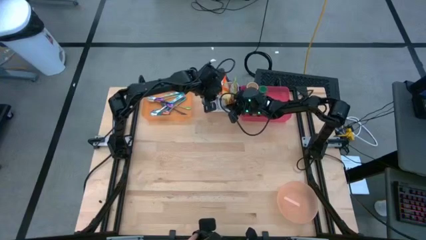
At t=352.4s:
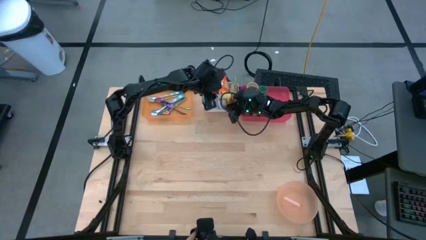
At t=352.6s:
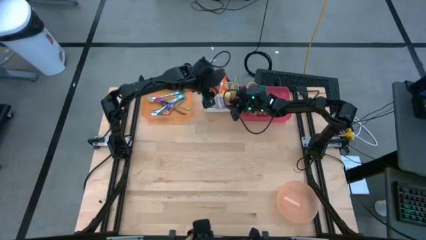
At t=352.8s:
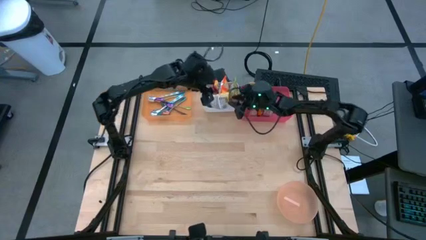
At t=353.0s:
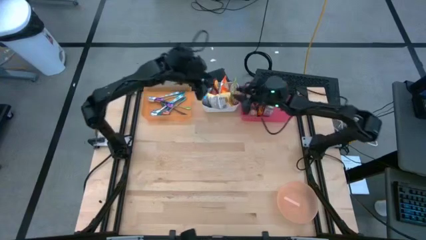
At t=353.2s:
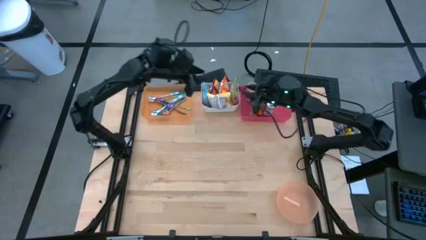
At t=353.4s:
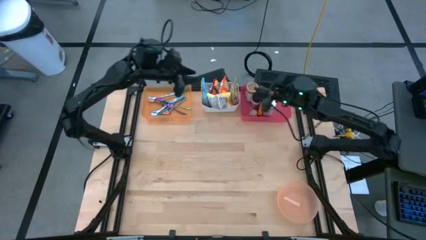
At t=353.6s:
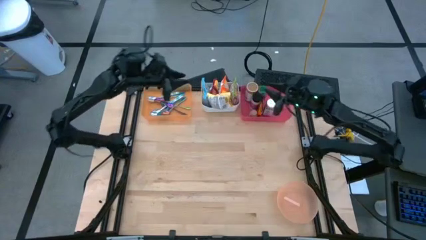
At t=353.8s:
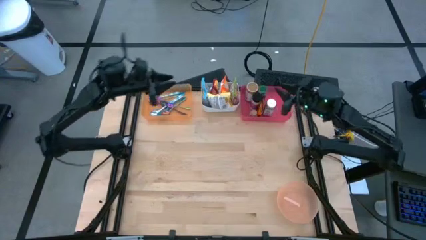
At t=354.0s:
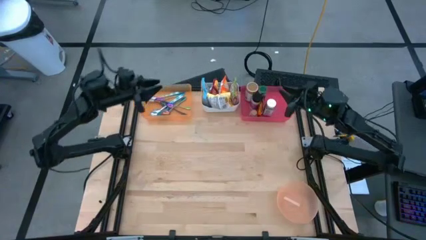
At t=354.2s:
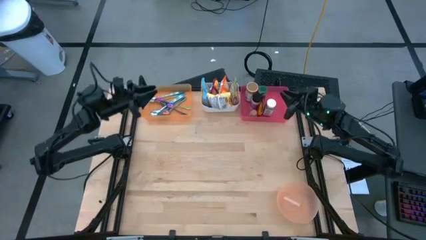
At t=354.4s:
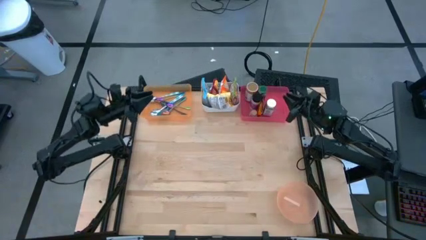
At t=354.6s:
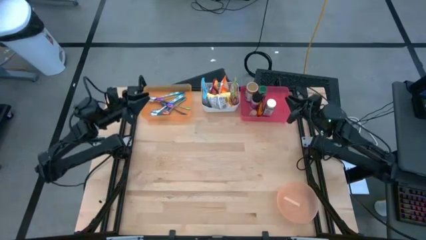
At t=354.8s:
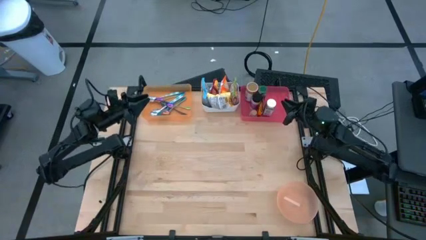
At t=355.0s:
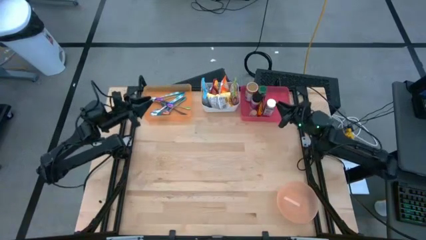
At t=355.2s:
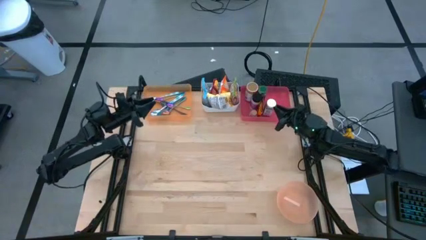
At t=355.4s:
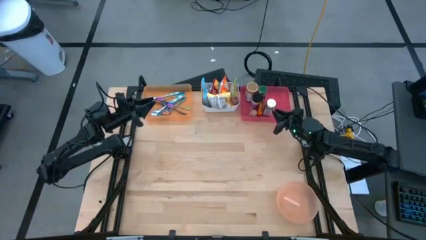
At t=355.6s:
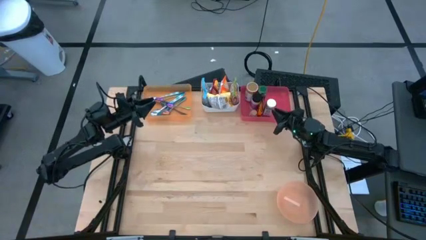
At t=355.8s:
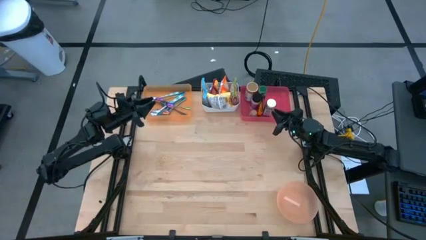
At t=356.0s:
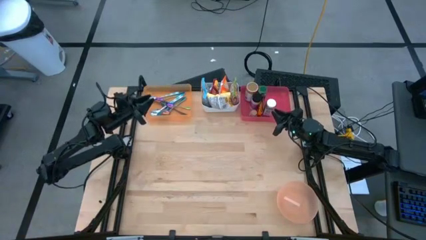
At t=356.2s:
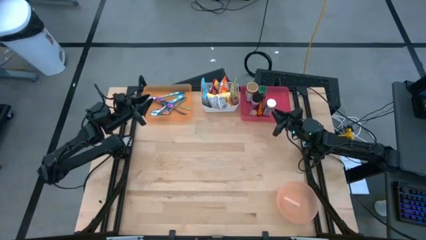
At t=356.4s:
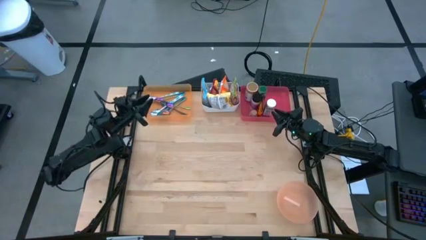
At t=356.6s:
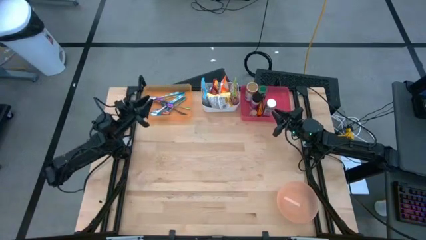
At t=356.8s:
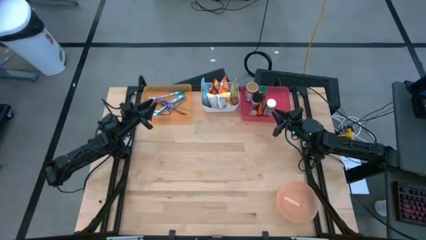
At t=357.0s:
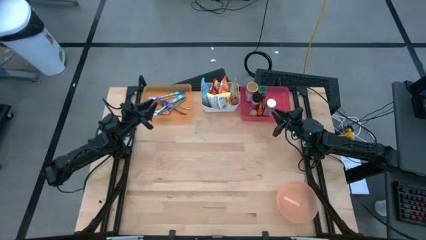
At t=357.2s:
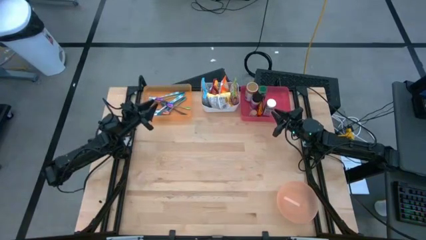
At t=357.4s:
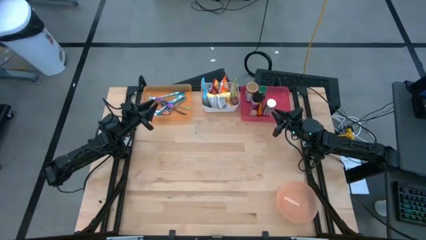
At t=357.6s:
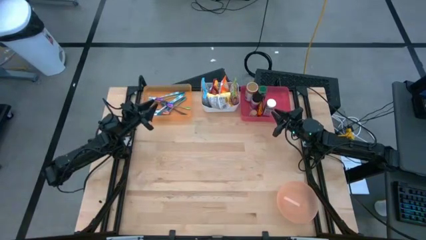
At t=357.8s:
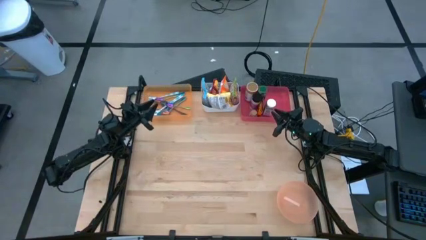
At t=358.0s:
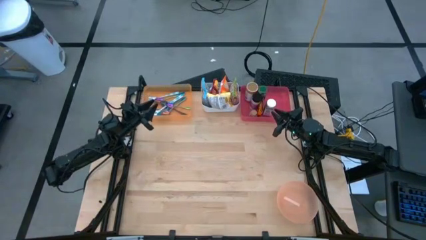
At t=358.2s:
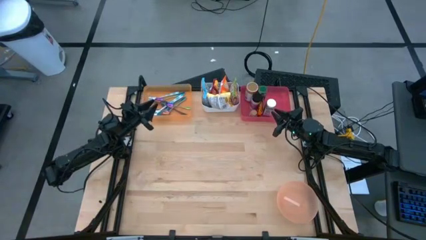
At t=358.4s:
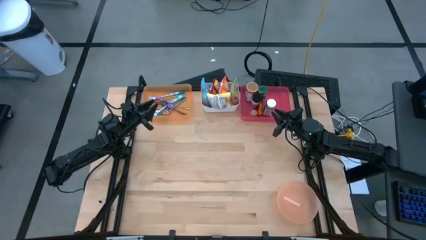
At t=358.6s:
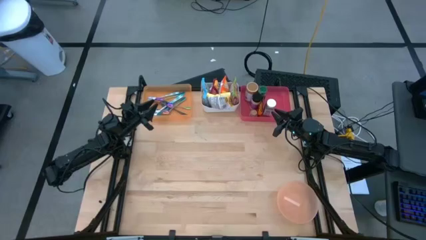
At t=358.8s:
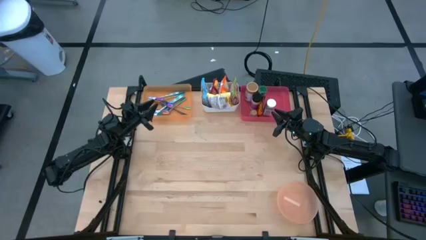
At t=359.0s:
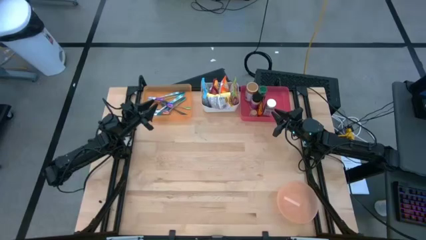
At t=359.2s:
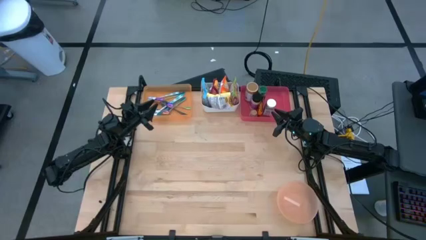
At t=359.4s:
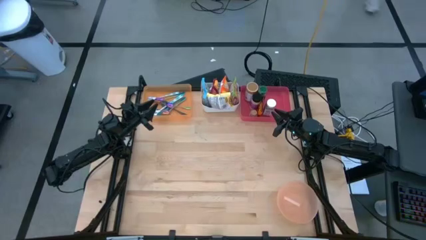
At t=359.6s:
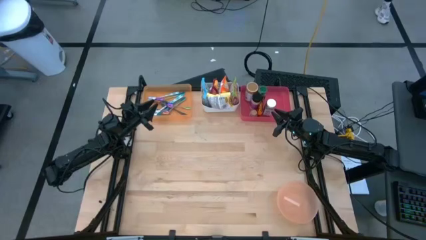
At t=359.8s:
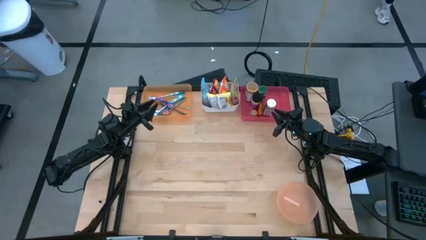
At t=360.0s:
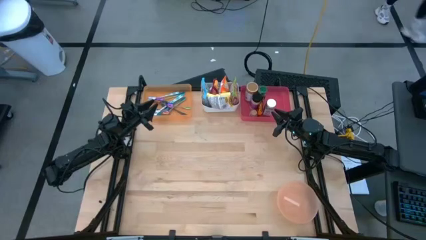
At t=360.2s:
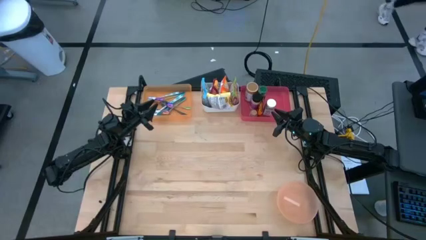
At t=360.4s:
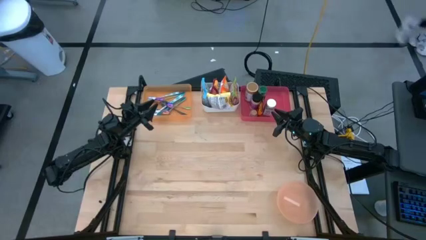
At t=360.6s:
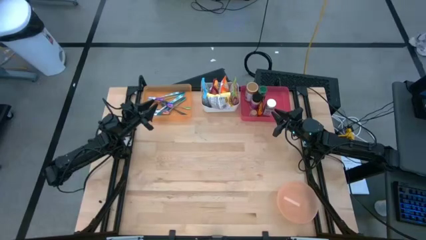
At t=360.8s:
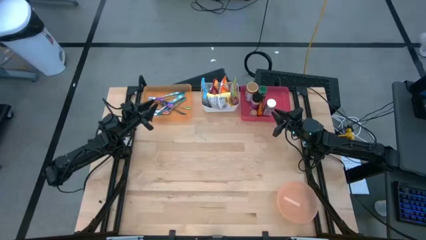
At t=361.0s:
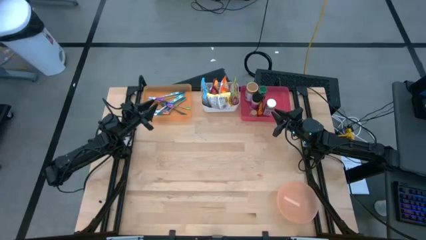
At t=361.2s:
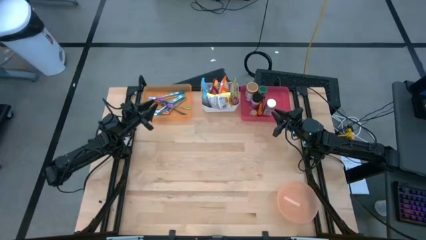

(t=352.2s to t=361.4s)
Task: Pick & Place Food Item
Return to Home Position
